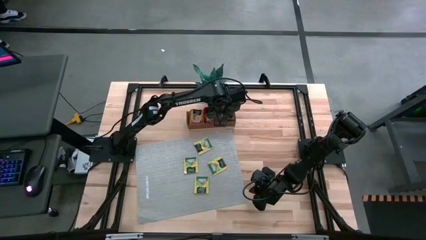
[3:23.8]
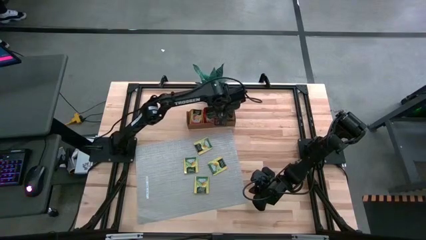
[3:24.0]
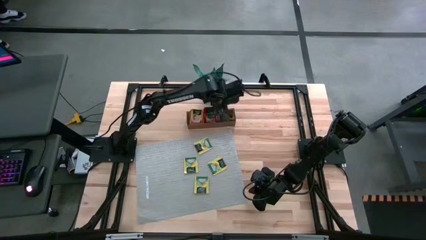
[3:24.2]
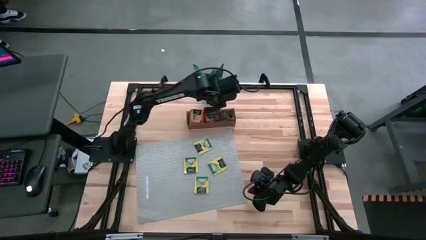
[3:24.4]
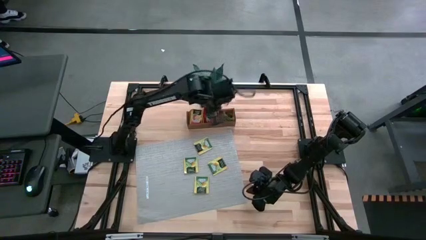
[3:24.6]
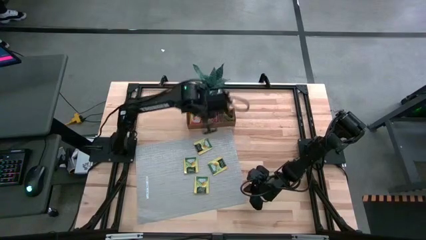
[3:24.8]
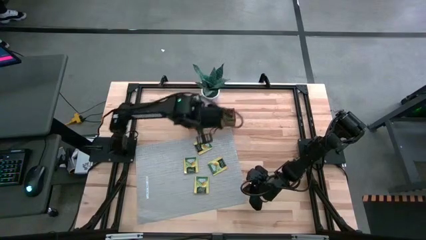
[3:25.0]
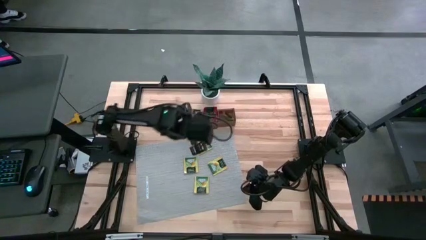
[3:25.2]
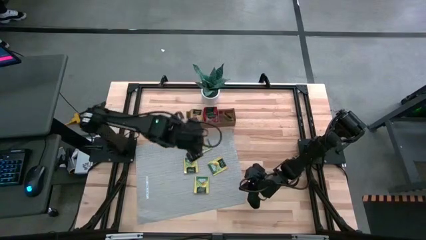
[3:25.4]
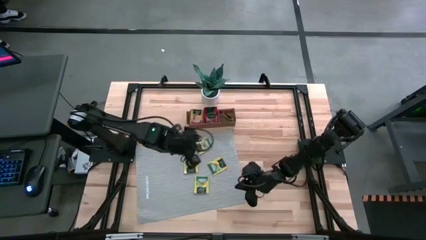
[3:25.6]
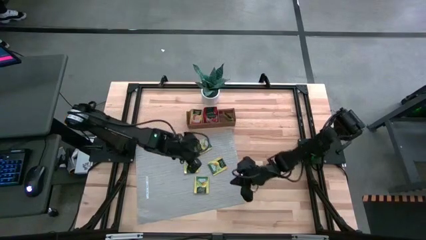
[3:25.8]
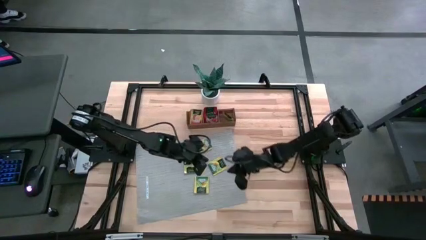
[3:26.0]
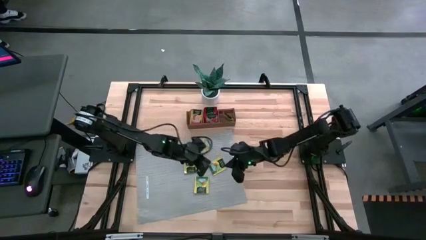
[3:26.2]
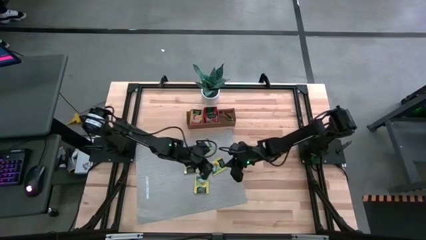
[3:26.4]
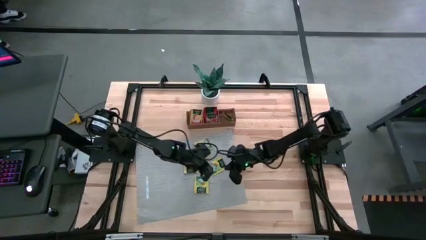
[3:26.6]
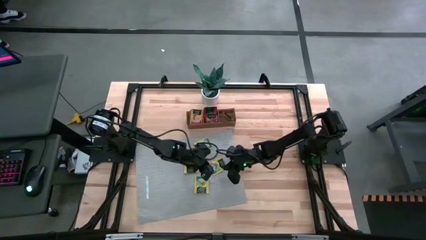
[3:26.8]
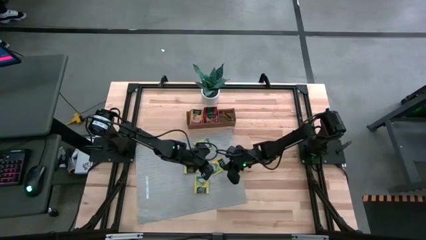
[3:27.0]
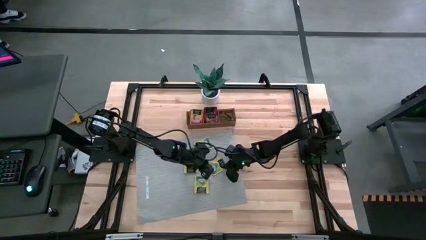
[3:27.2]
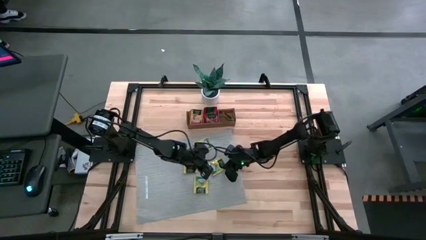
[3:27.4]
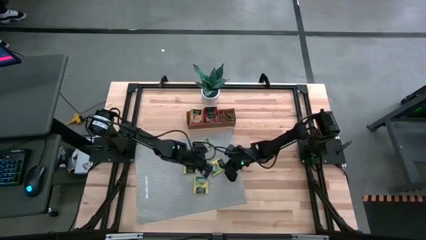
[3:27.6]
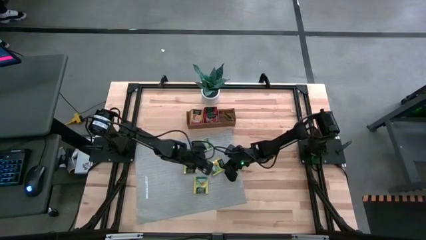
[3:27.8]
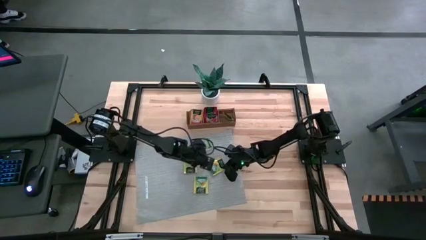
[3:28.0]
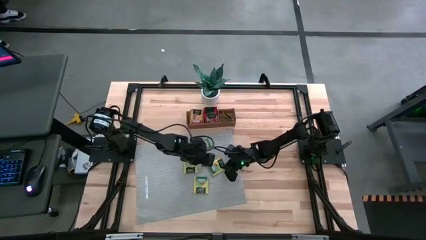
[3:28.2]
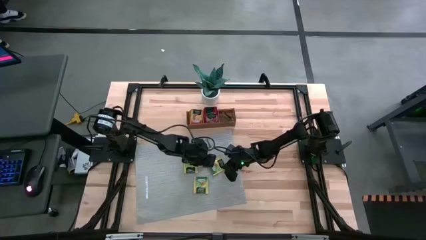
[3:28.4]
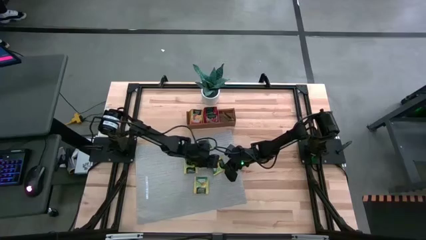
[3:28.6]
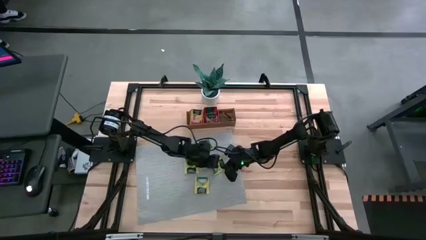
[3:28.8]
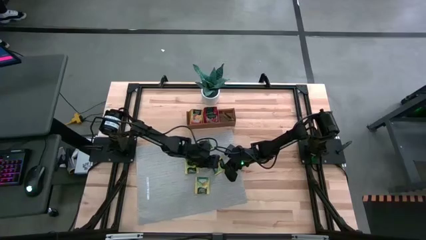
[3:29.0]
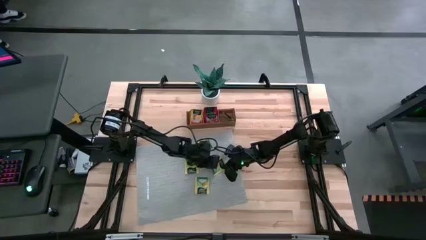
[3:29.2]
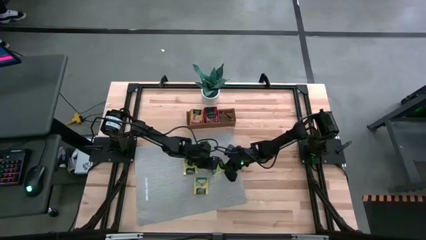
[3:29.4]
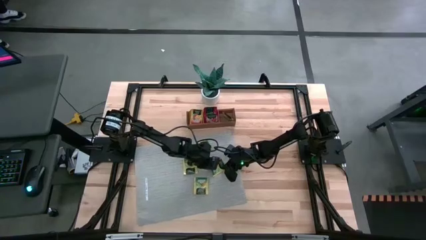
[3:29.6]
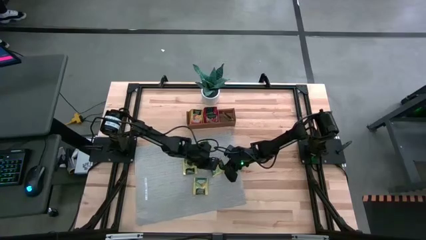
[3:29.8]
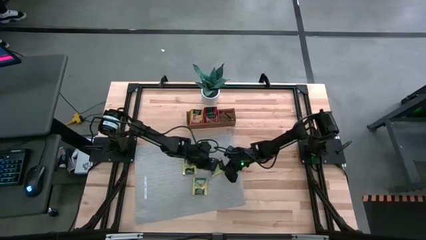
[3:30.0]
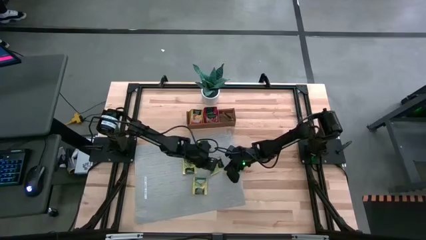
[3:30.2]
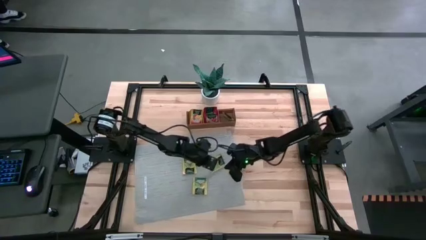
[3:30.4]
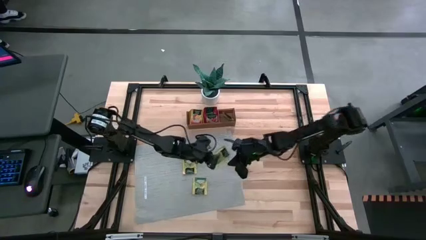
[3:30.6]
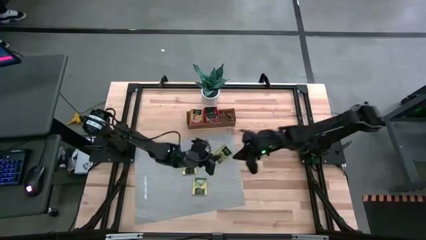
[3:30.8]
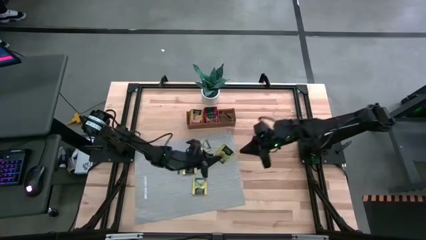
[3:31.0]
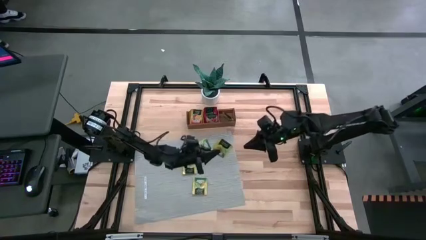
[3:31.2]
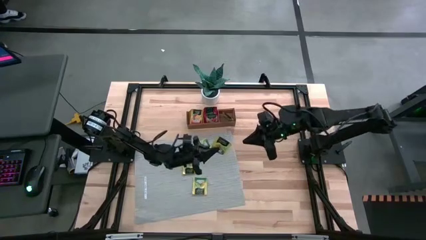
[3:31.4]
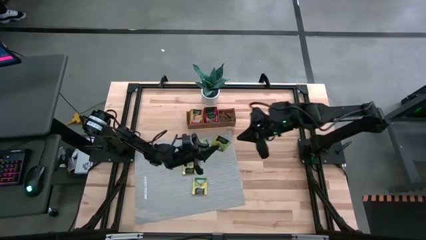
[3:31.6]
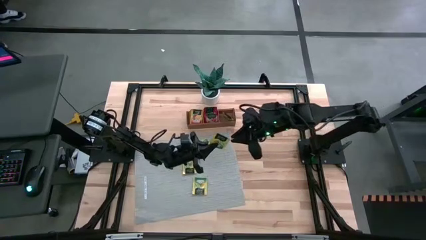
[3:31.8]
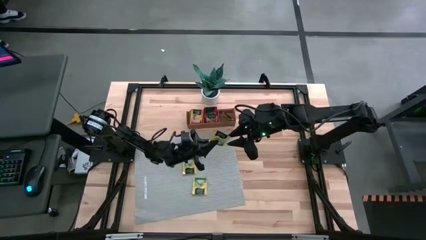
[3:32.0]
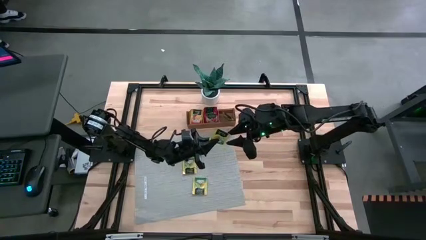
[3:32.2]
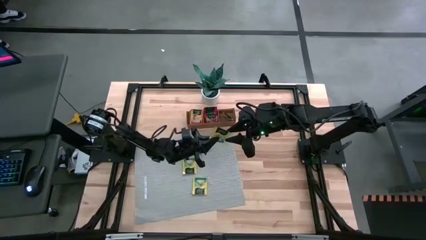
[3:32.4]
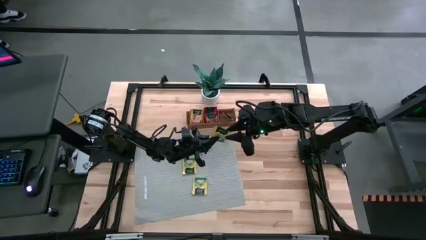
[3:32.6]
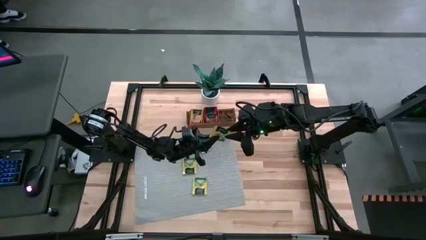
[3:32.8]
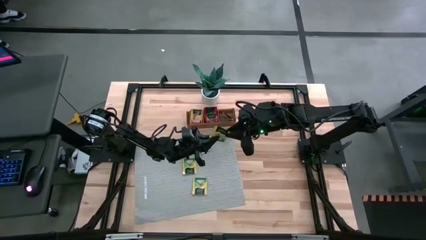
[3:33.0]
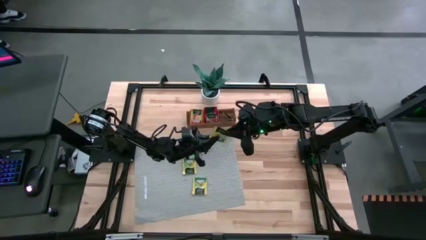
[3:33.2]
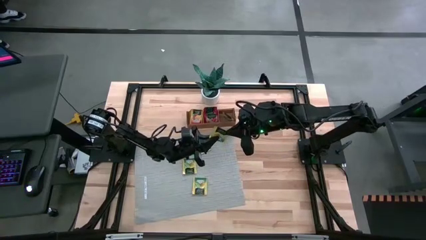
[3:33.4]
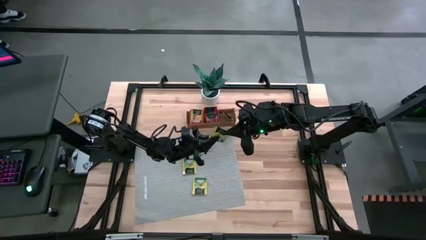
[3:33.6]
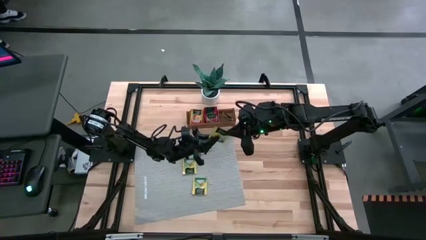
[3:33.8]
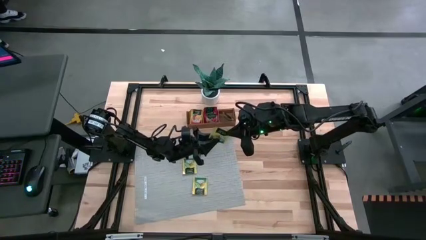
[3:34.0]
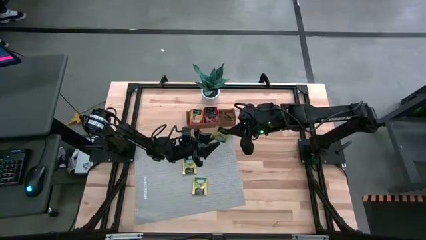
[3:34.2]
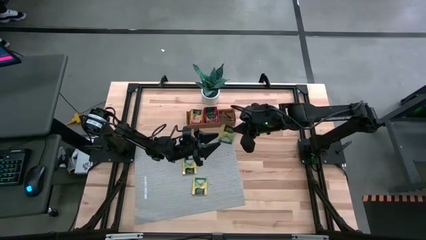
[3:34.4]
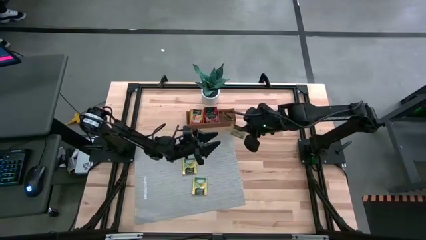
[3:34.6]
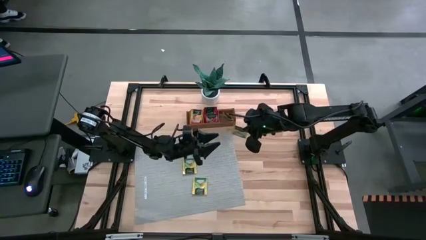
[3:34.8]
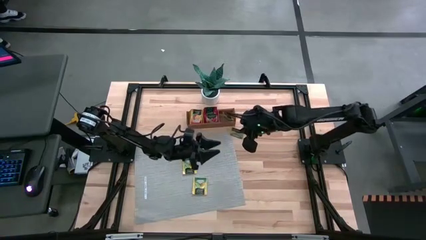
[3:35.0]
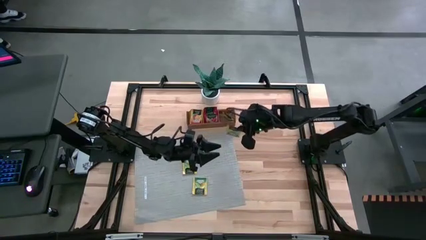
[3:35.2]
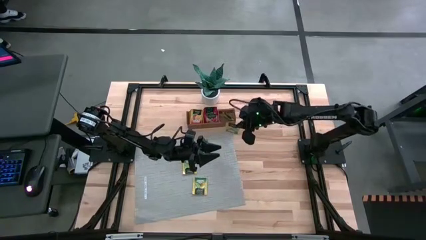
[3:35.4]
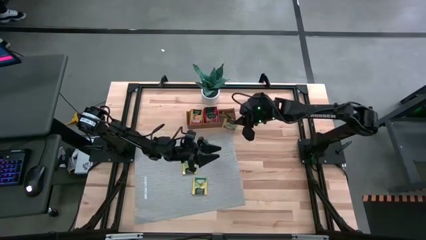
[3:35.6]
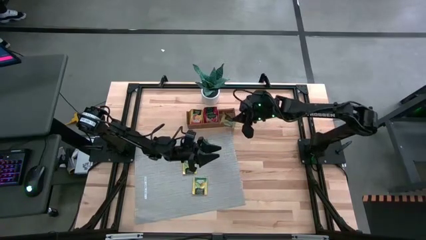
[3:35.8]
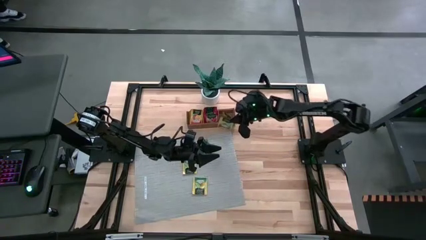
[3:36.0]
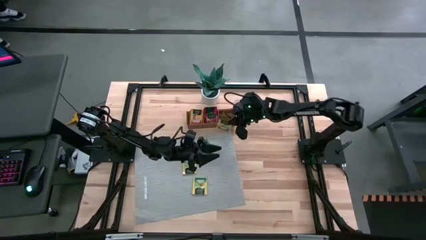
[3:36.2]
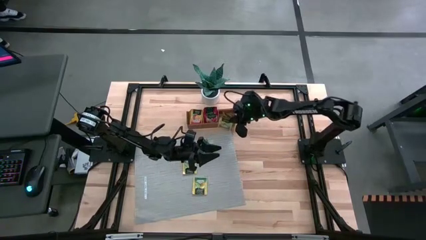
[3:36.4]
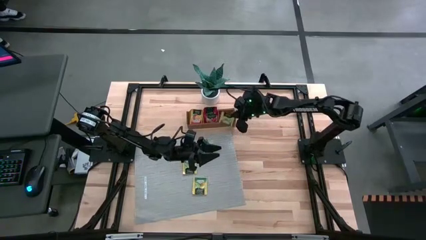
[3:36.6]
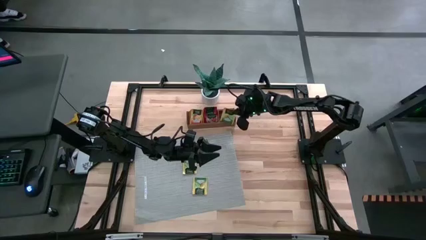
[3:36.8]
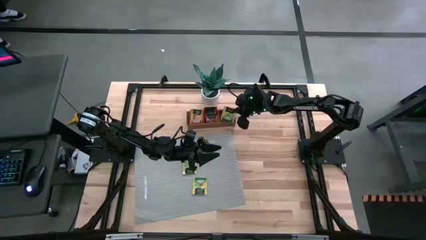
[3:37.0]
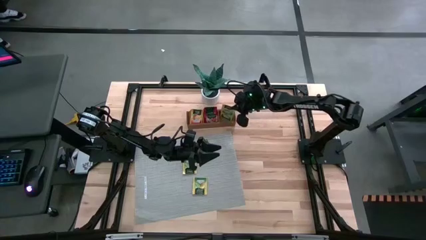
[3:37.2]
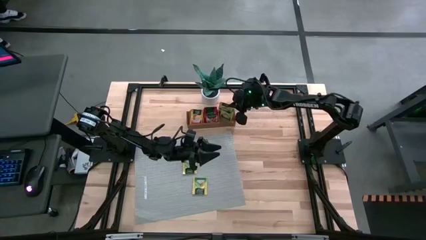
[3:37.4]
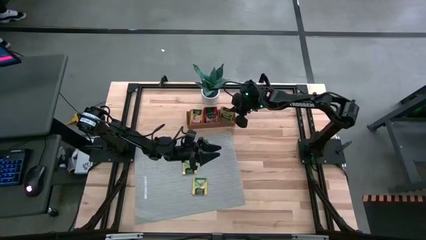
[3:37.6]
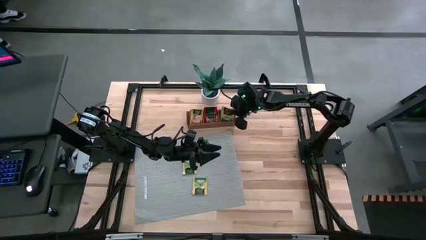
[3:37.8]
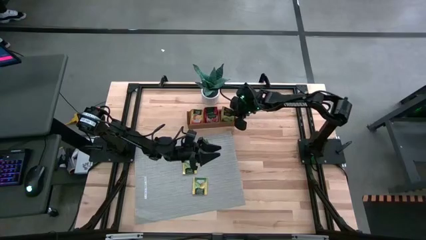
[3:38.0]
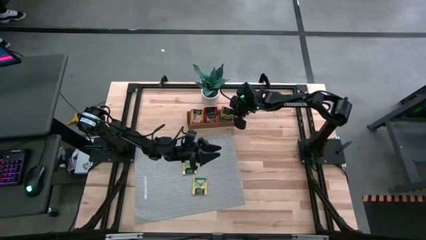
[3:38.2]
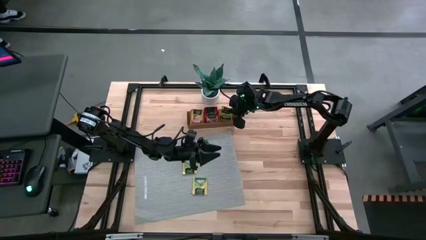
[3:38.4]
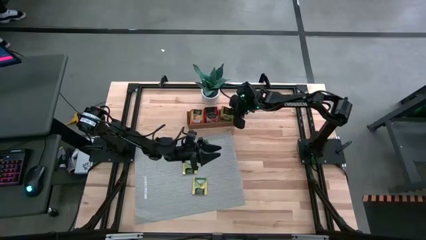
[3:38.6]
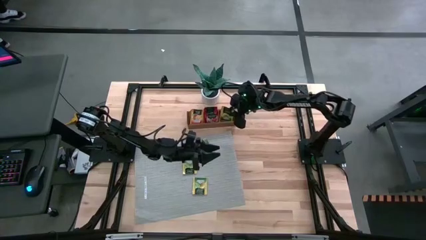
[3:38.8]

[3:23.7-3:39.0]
Task: Pick & Place Tea
Put the yellow tea bag into the right section of the wooden organizer
